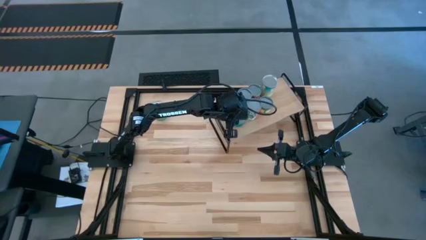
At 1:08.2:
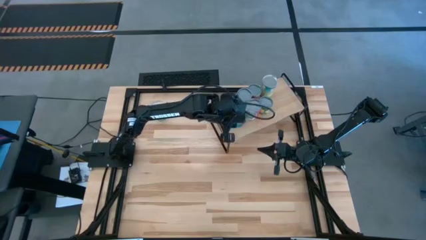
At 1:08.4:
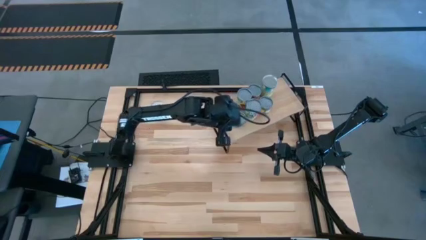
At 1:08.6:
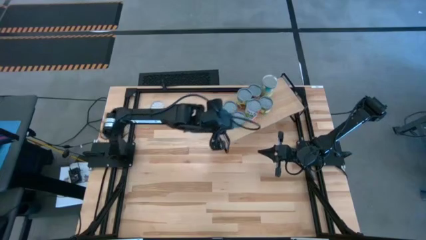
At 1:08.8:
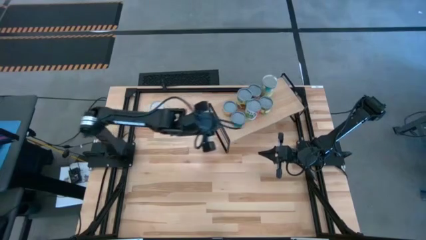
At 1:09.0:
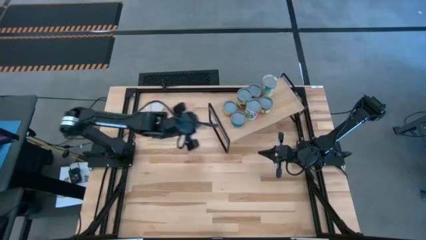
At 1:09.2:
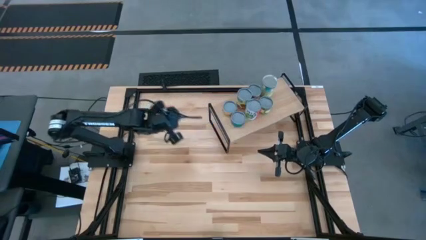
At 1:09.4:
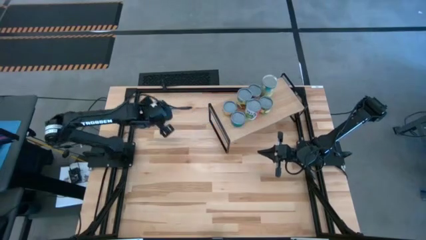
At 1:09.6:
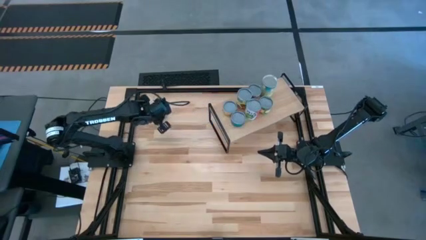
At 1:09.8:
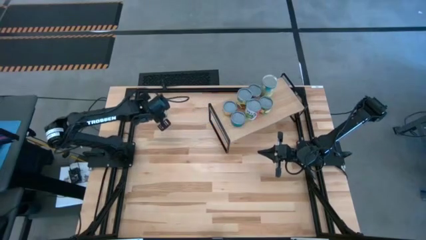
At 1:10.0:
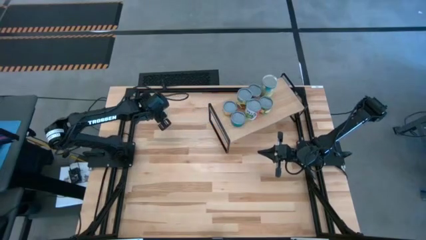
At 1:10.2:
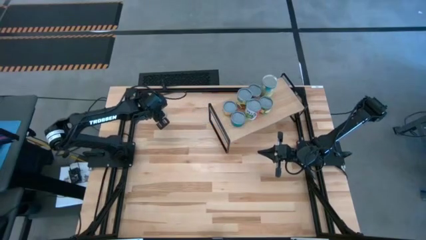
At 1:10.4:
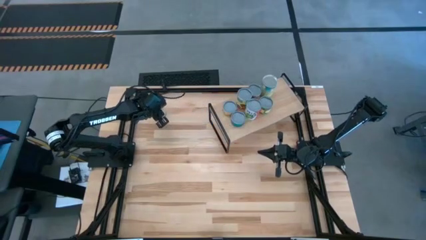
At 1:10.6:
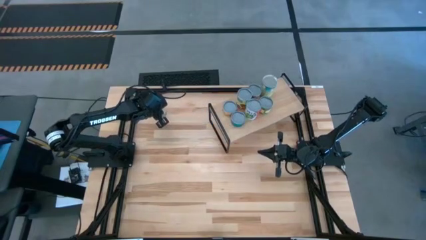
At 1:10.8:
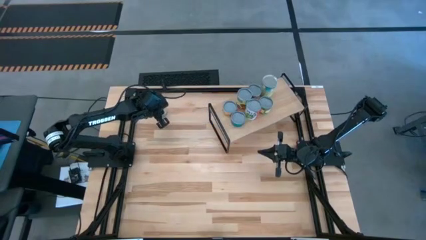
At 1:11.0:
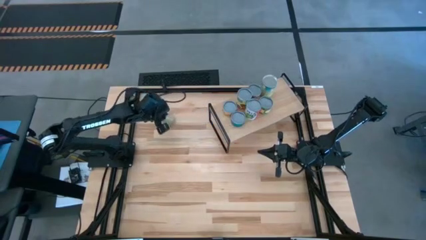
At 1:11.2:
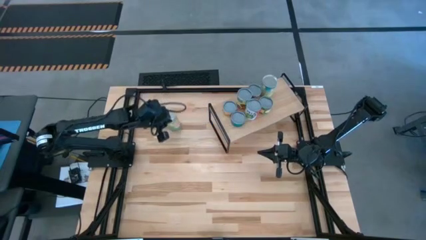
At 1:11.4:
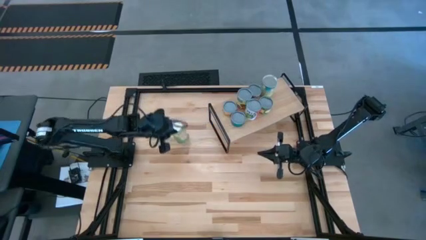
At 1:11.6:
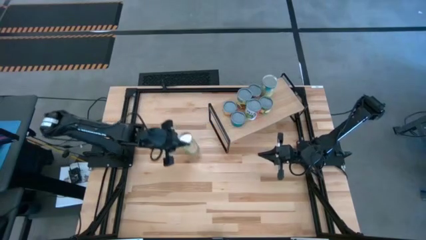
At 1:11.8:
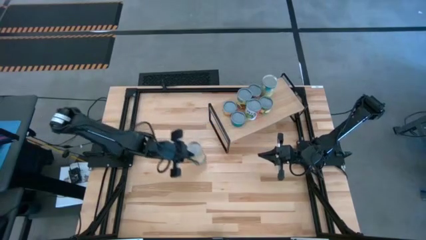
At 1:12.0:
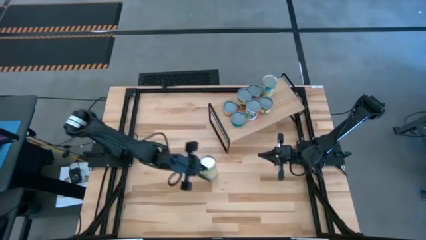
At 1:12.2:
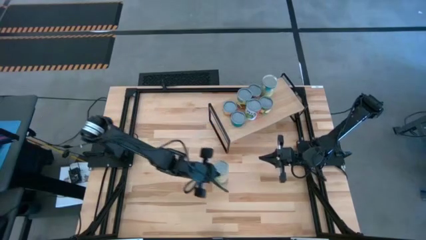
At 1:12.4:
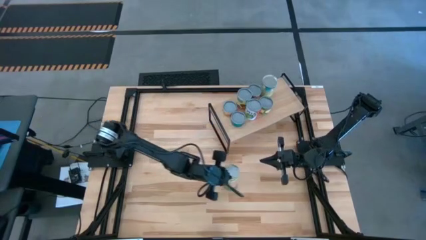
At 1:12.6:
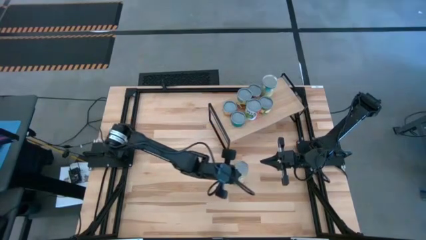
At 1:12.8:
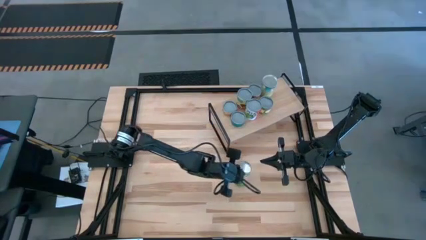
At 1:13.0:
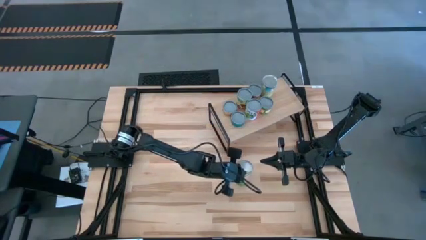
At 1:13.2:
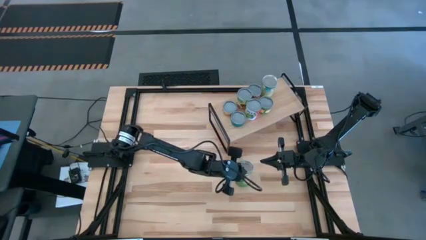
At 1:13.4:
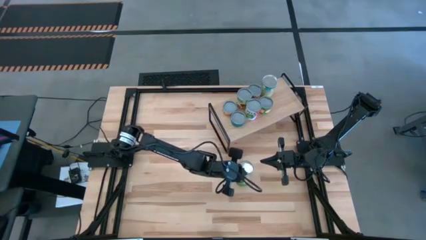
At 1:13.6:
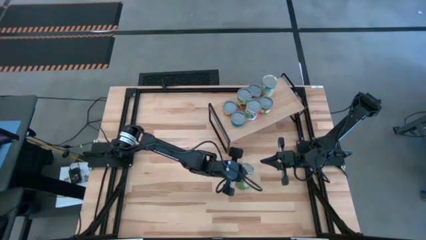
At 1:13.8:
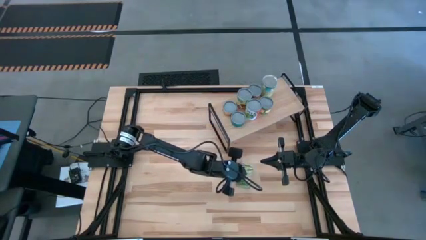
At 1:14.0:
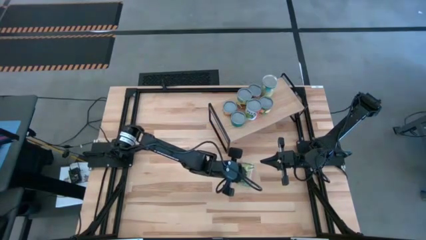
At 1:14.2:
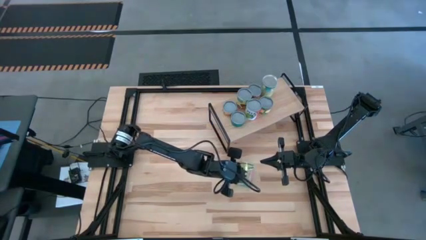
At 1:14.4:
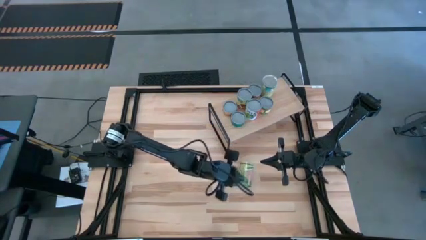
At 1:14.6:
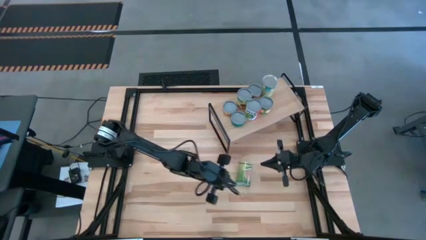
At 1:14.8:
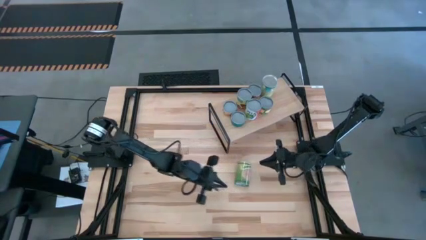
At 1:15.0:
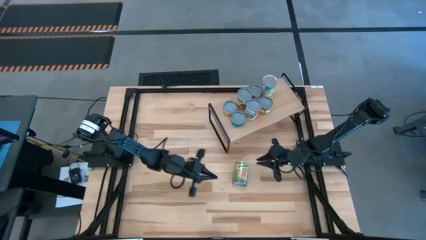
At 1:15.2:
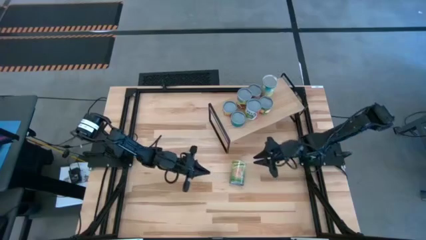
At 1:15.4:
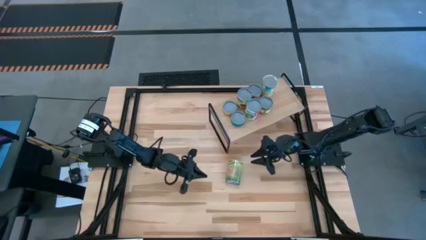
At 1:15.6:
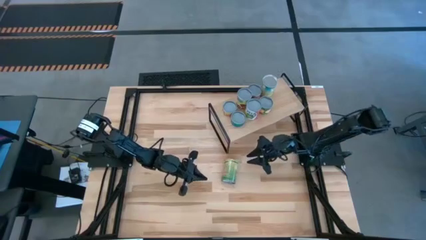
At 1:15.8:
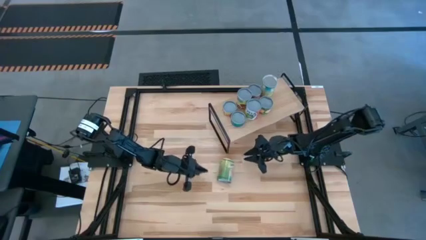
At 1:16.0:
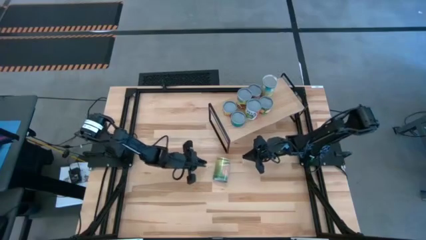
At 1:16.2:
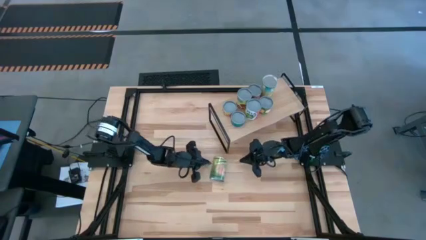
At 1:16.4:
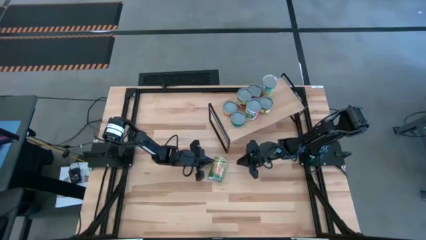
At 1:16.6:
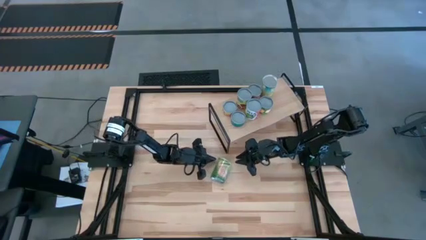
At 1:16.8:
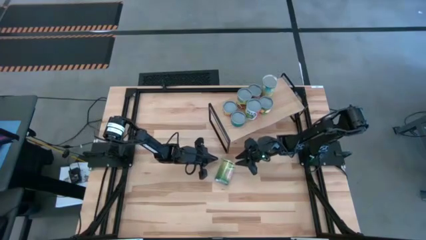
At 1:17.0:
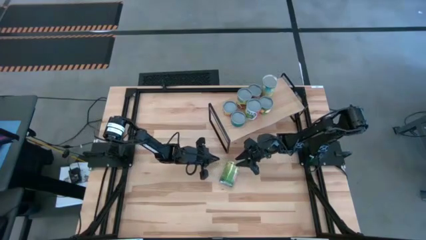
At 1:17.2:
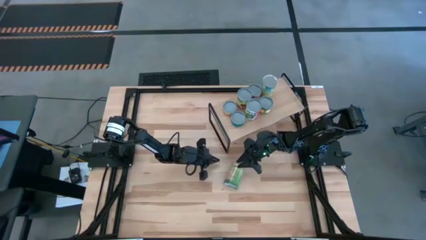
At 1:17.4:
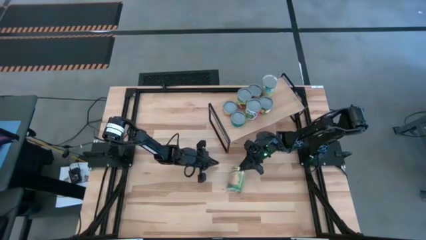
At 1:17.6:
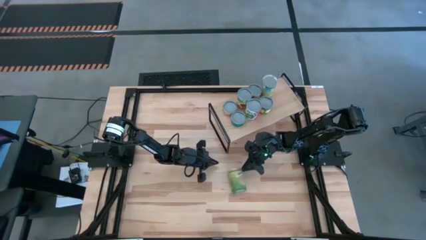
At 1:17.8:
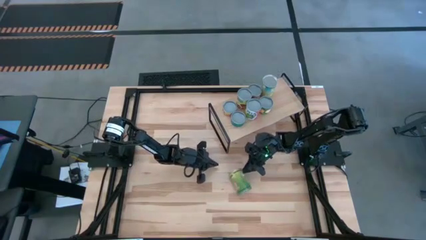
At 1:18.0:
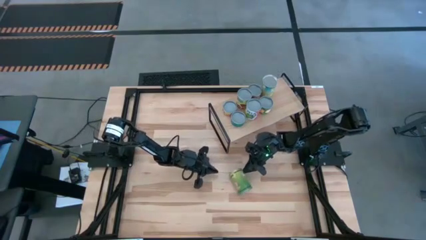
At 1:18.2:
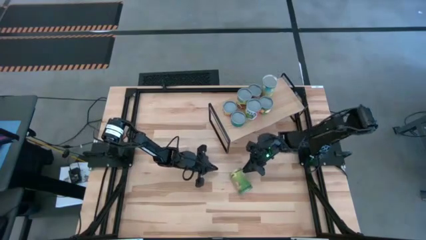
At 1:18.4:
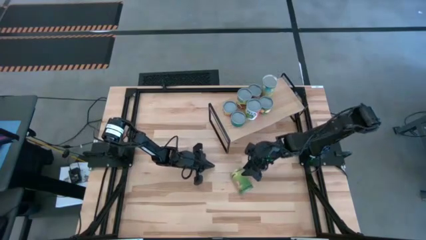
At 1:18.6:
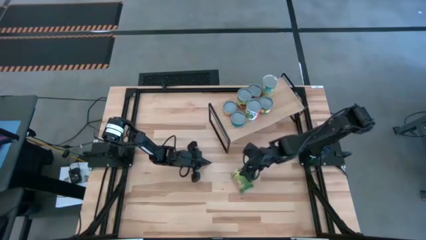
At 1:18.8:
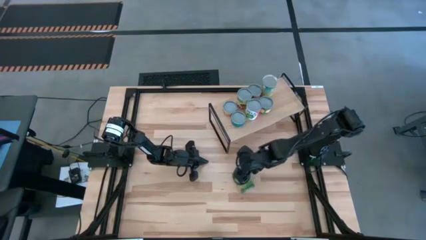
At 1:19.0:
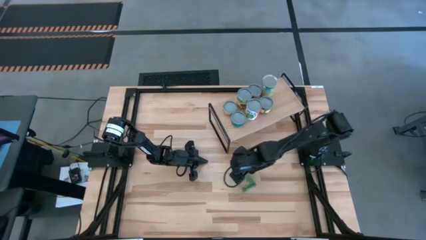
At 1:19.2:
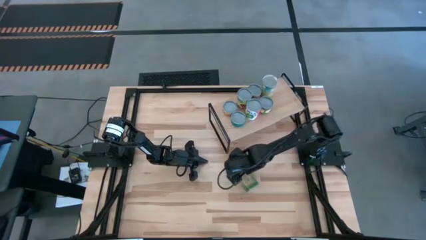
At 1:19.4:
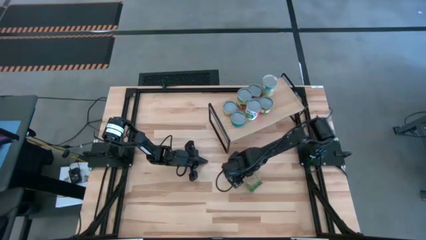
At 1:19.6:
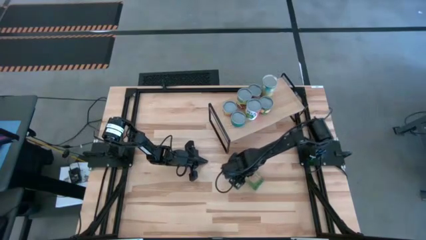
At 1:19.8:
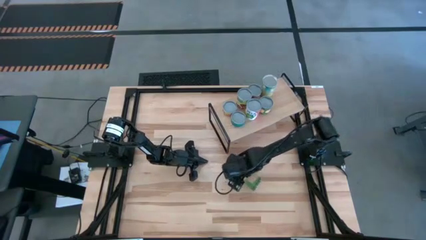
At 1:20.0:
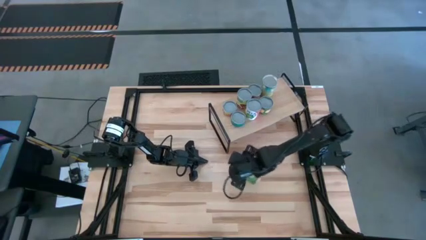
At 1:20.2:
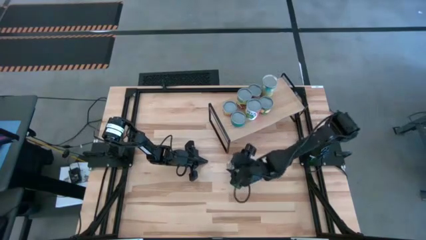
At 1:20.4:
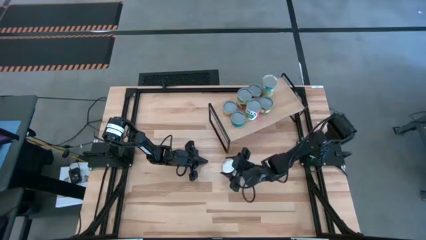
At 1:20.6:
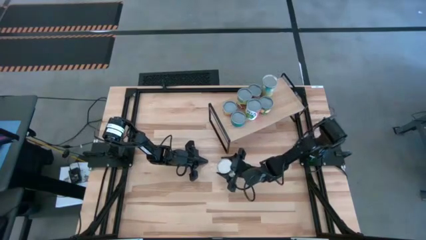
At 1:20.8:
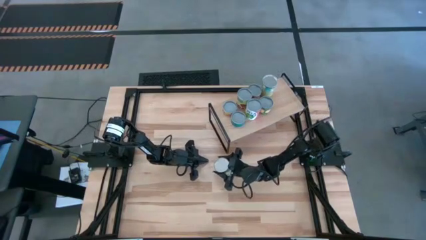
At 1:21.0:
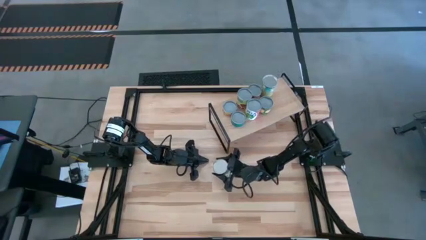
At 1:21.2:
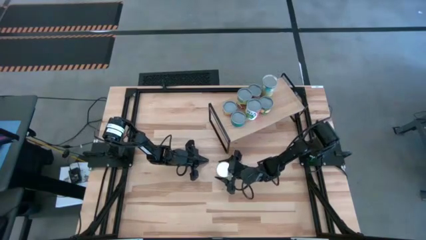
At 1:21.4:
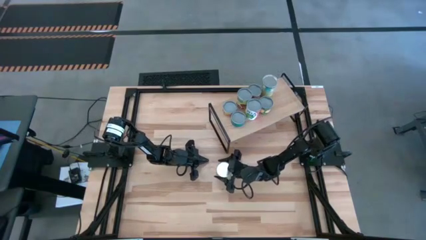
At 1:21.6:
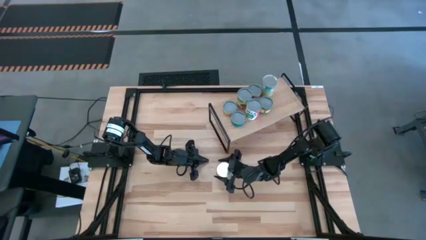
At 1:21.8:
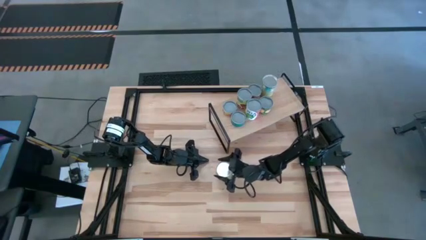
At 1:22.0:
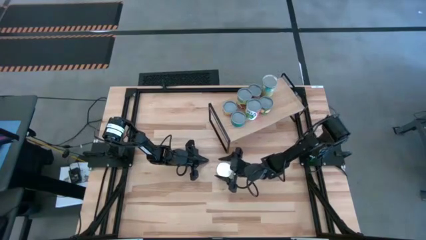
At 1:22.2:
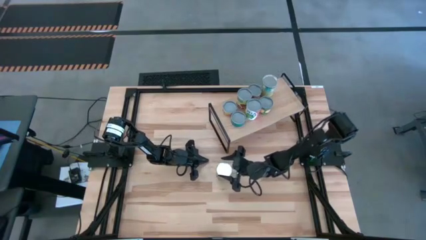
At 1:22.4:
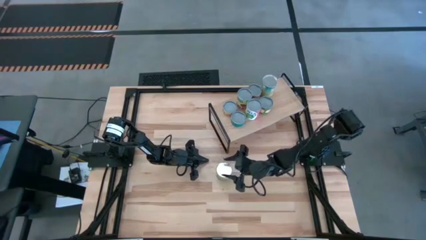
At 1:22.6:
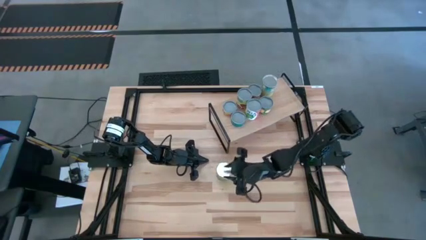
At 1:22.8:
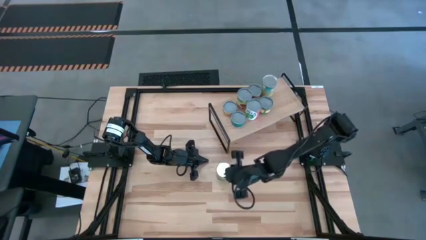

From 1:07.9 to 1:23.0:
Task: Pick and place cans onto a shelf
Put the canned oranges on the shelf
